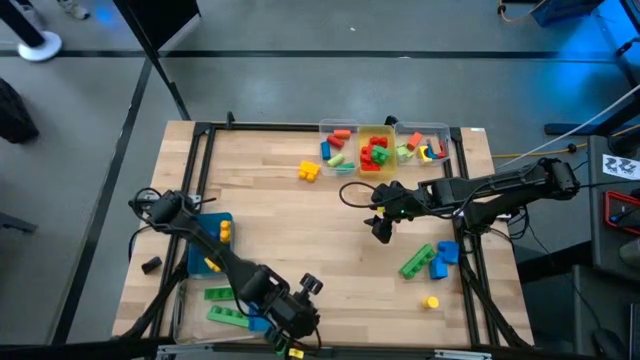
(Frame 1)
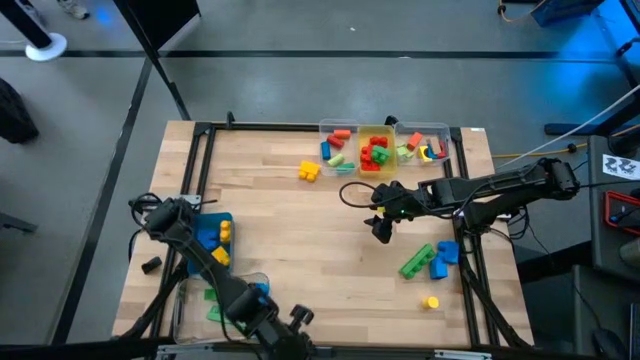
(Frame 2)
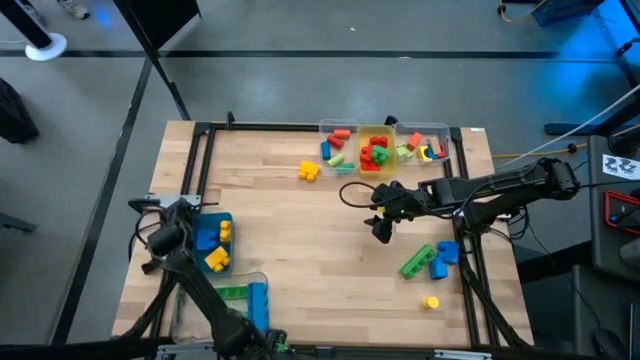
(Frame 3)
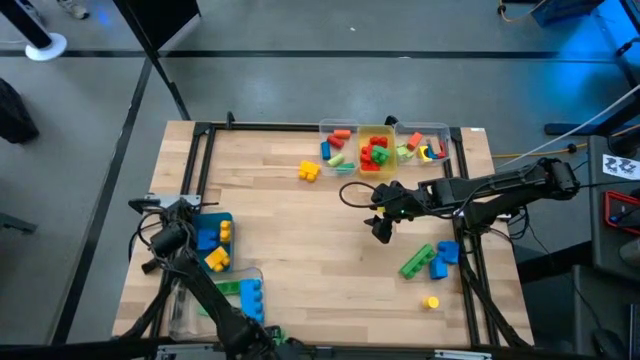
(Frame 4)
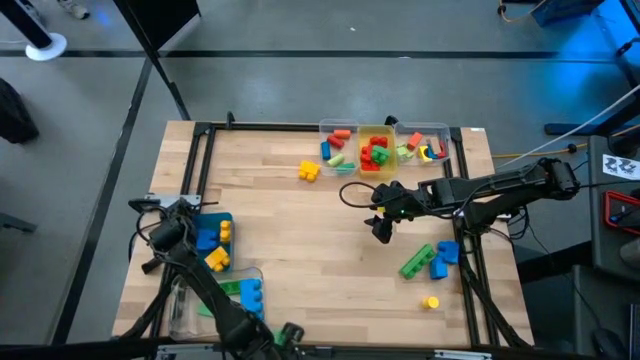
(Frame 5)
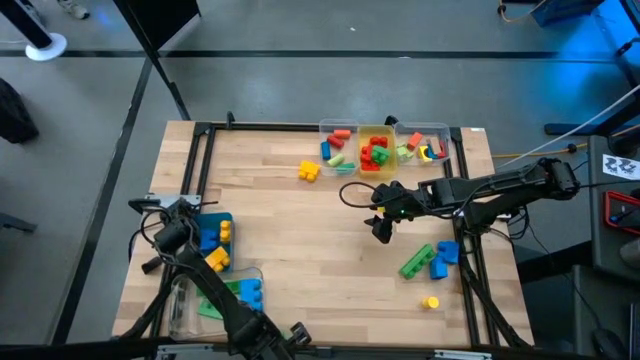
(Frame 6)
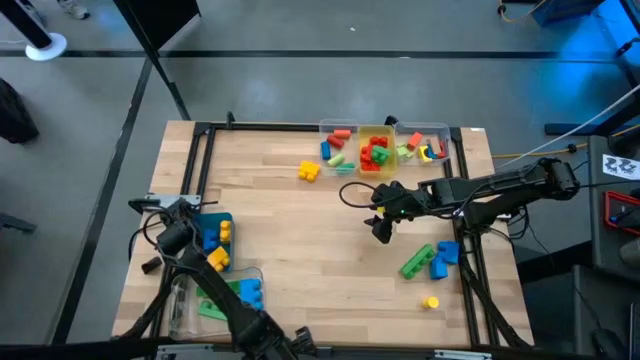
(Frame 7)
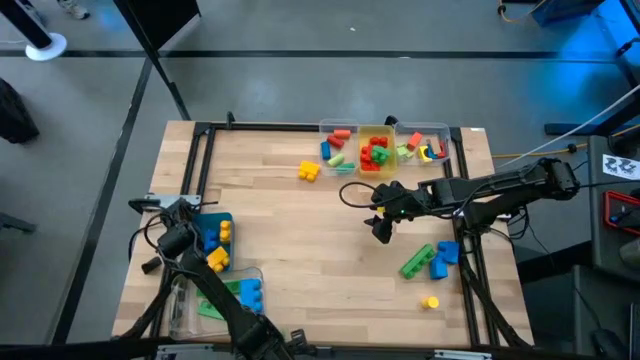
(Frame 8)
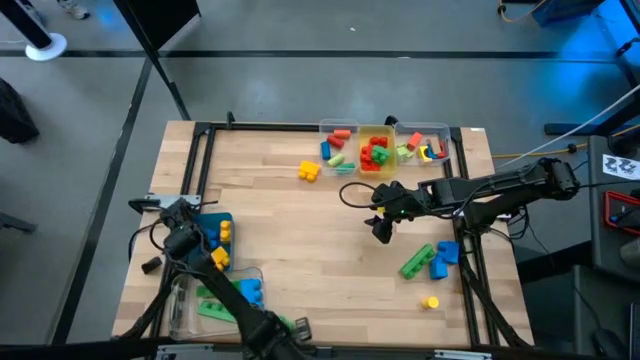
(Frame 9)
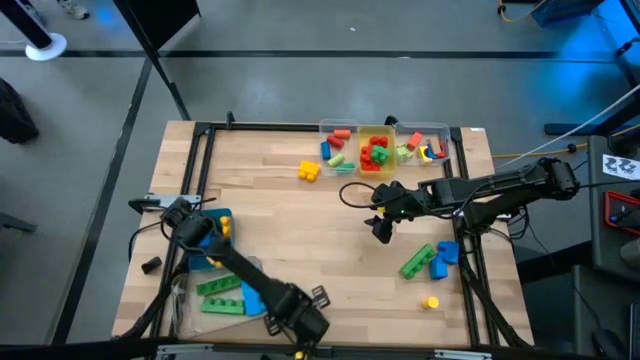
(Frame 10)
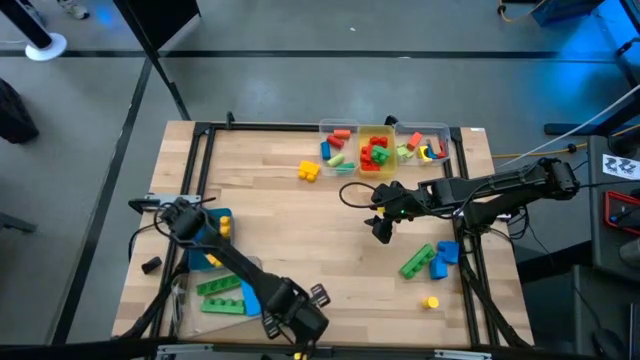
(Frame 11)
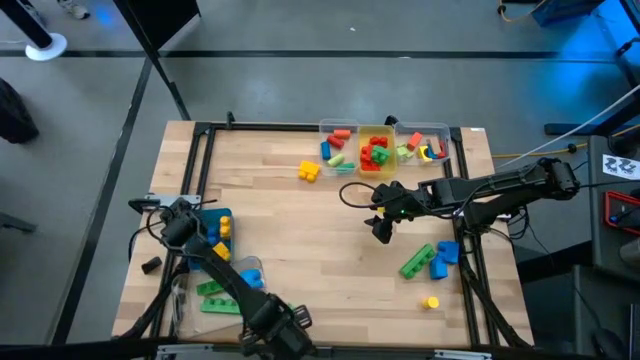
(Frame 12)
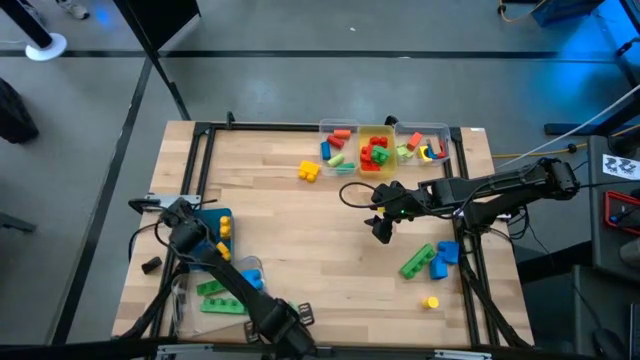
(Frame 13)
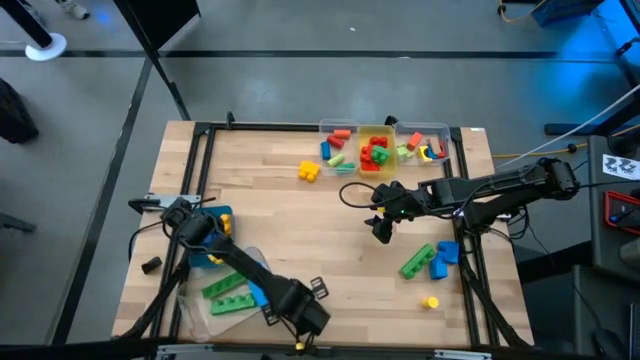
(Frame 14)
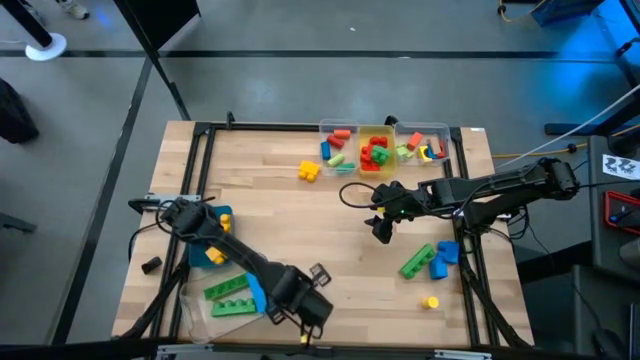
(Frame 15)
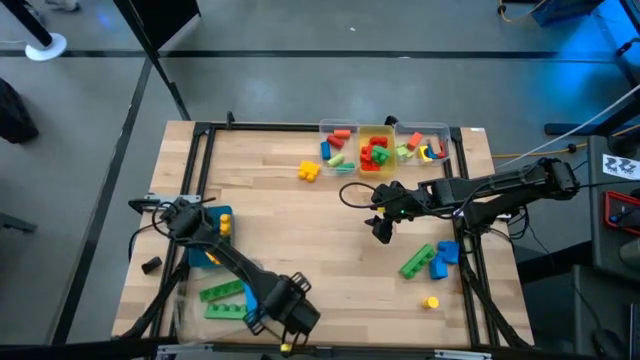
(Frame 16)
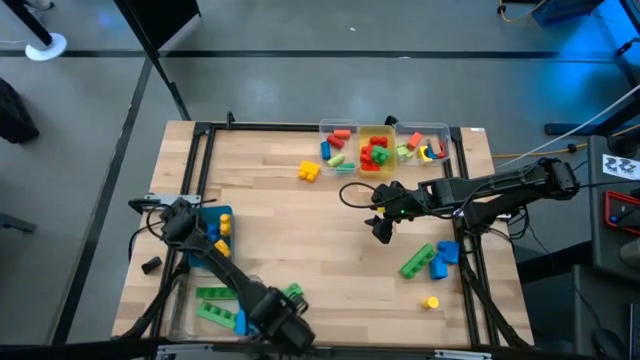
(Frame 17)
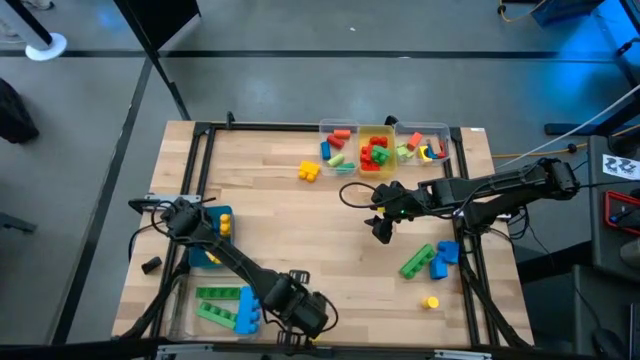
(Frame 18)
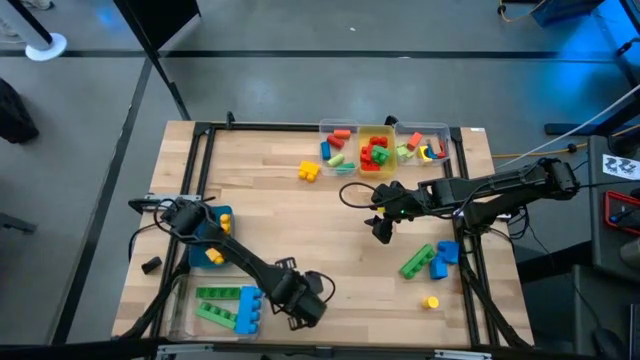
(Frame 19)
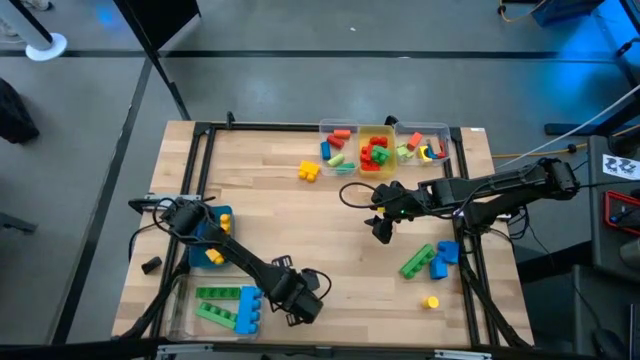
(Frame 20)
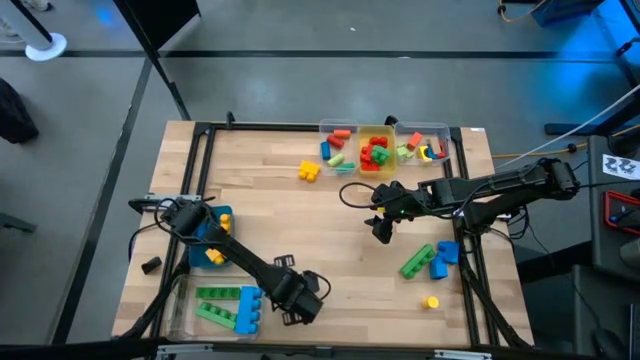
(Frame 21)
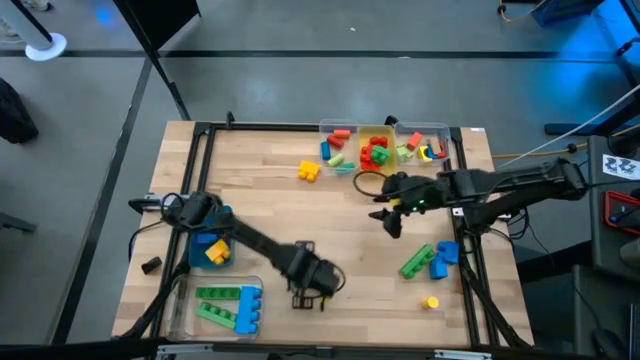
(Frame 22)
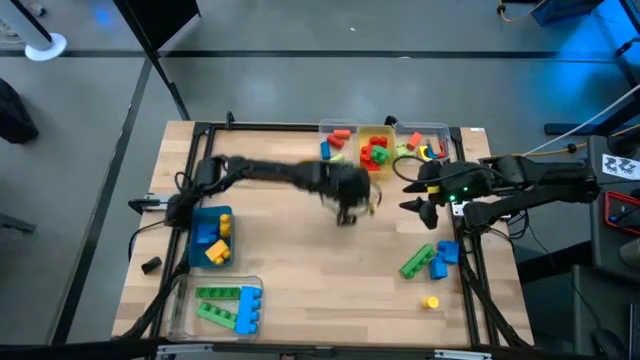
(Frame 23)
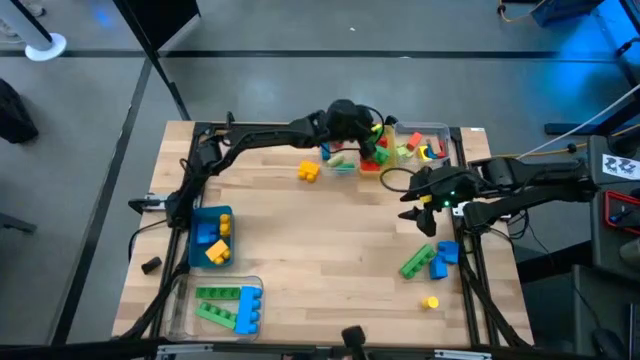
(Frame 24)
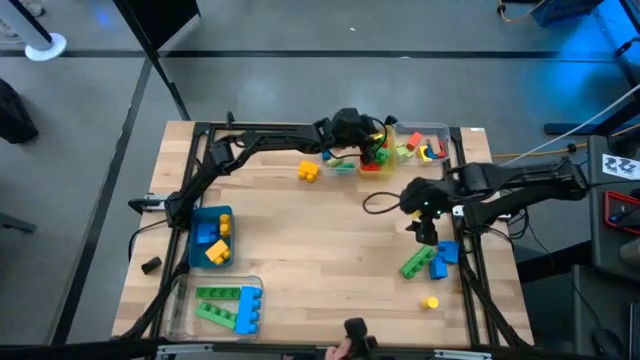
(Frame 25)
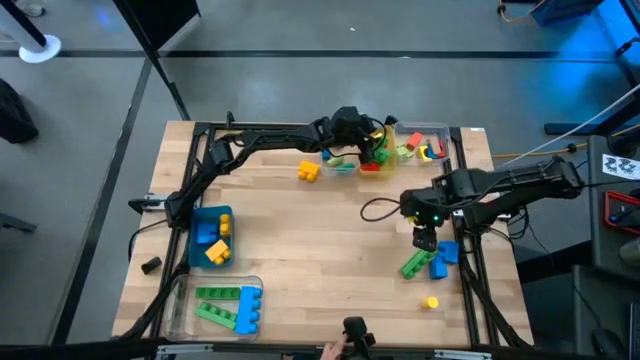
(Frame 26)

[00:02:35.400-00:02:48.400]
Task: Sort blocks by size
Put the green 2 stud game piece into the yellow bin

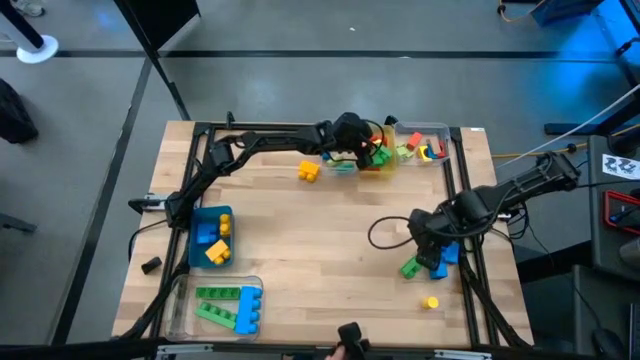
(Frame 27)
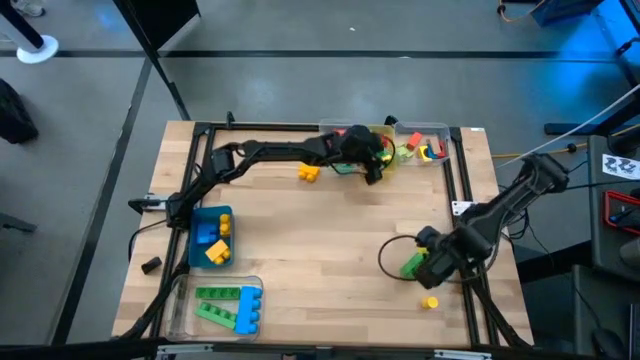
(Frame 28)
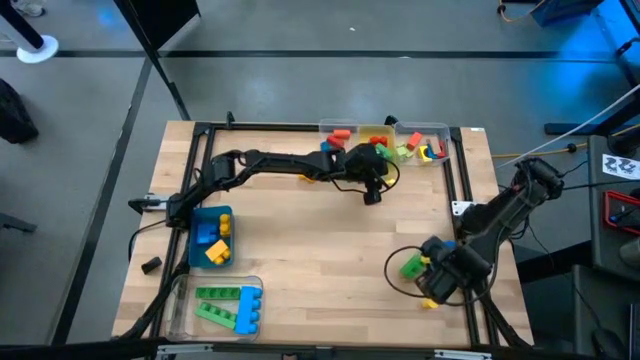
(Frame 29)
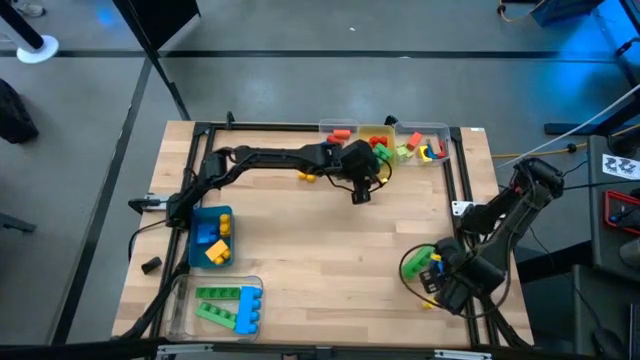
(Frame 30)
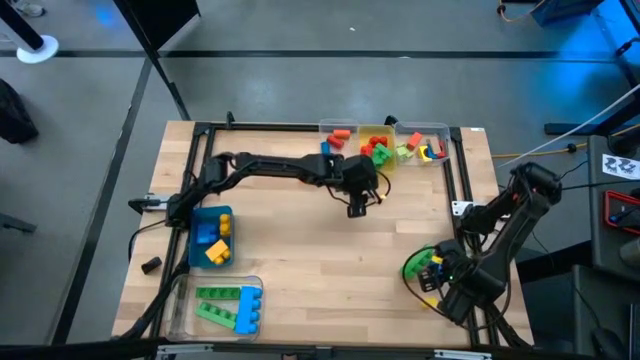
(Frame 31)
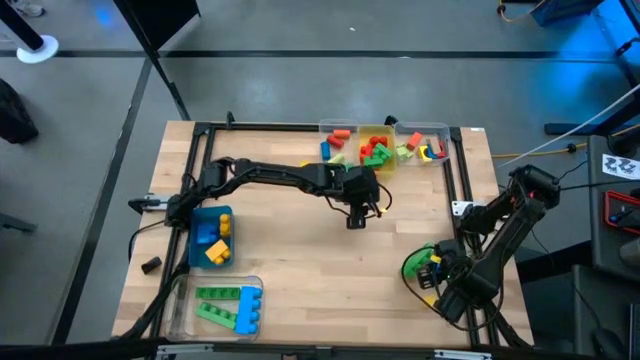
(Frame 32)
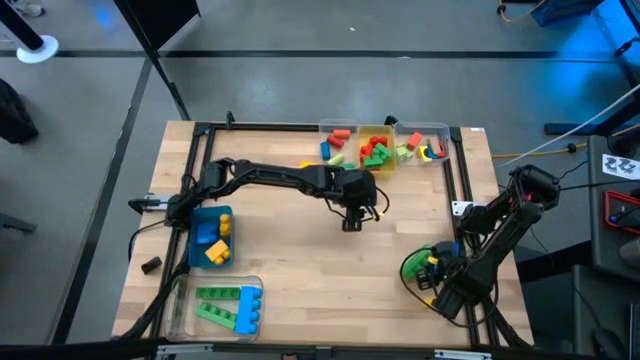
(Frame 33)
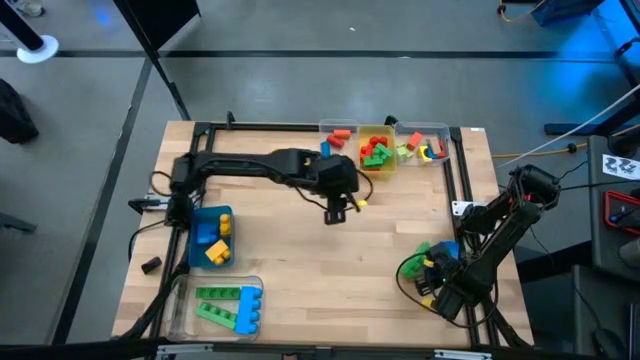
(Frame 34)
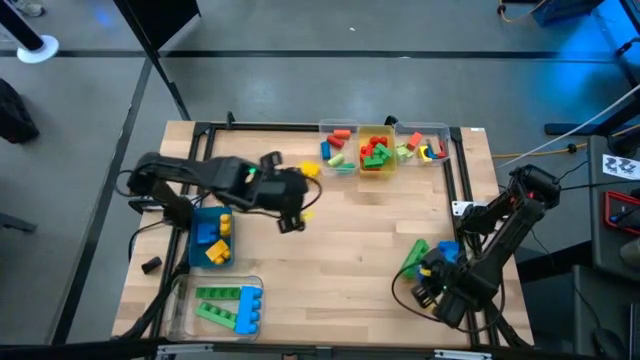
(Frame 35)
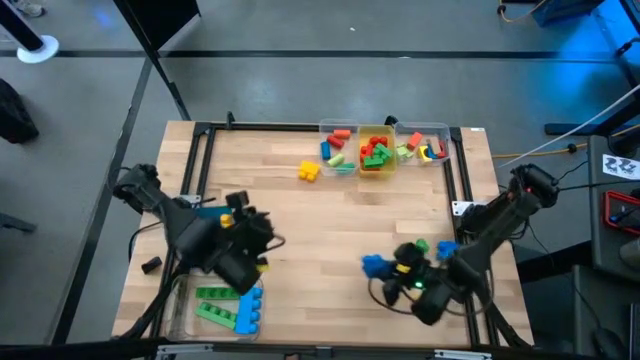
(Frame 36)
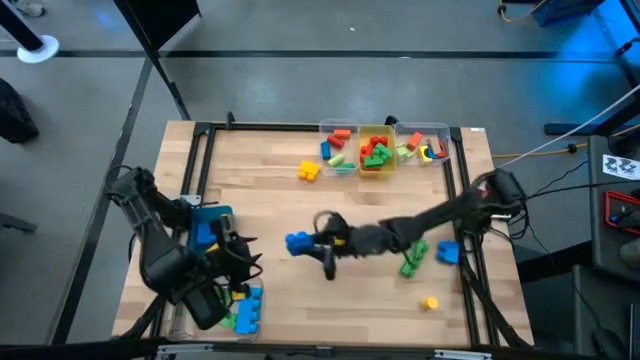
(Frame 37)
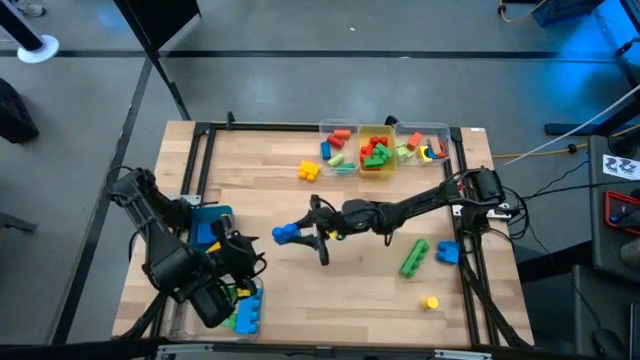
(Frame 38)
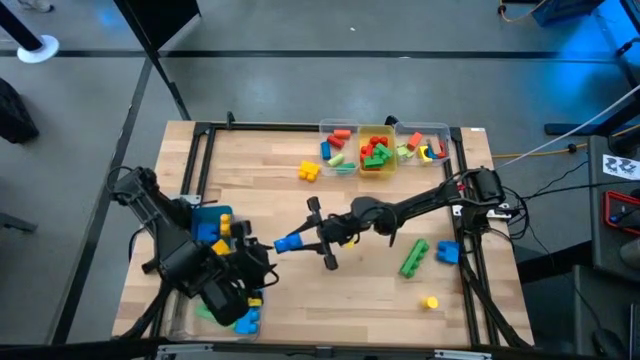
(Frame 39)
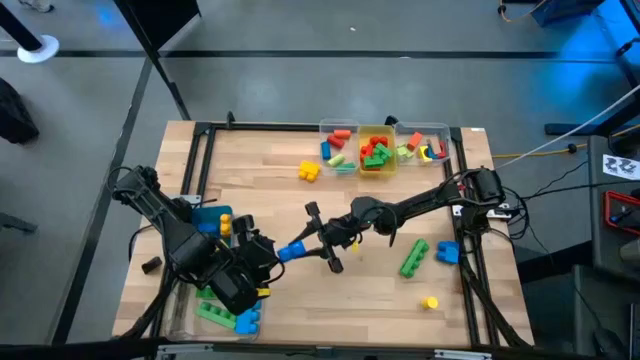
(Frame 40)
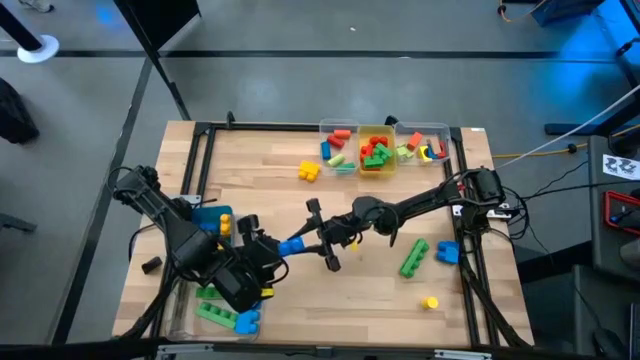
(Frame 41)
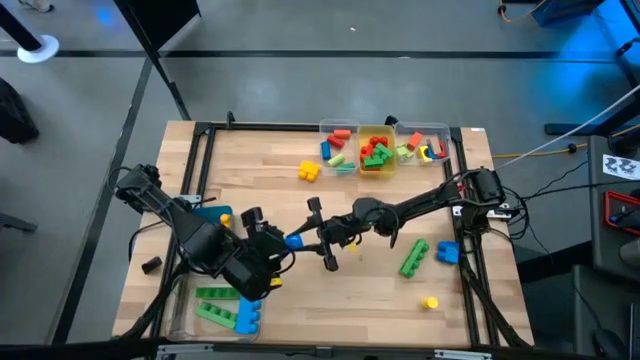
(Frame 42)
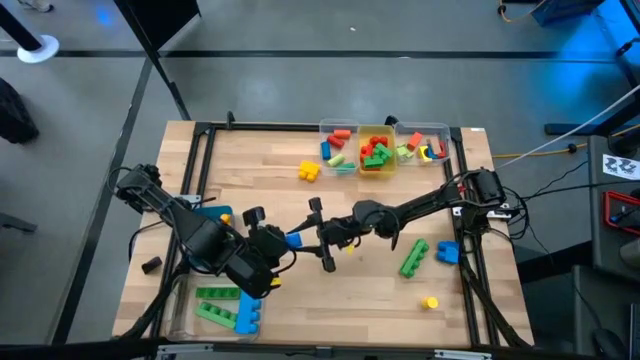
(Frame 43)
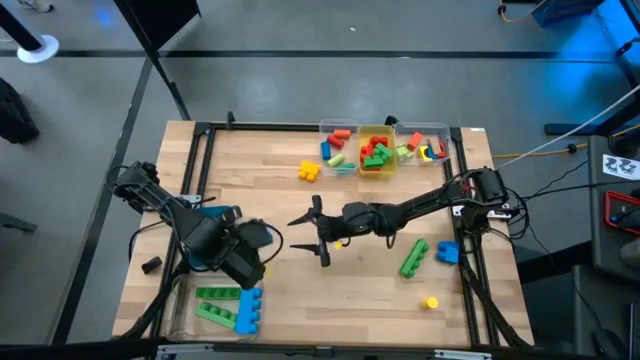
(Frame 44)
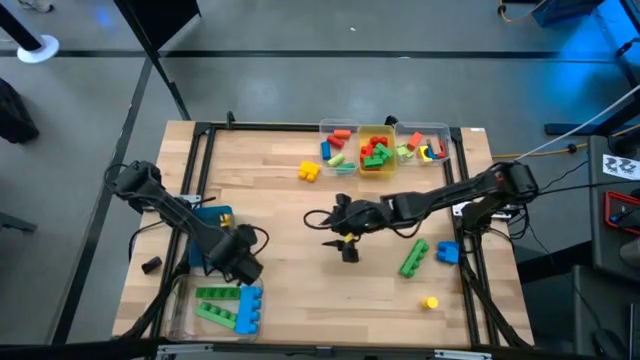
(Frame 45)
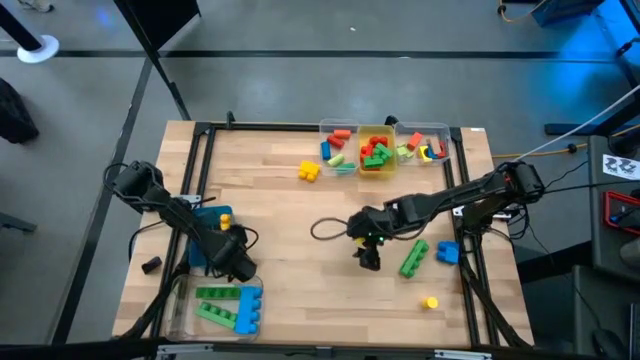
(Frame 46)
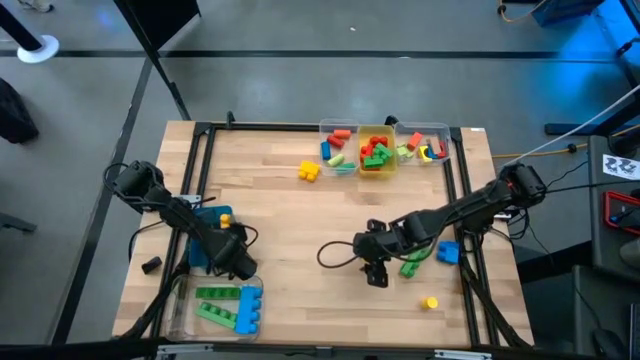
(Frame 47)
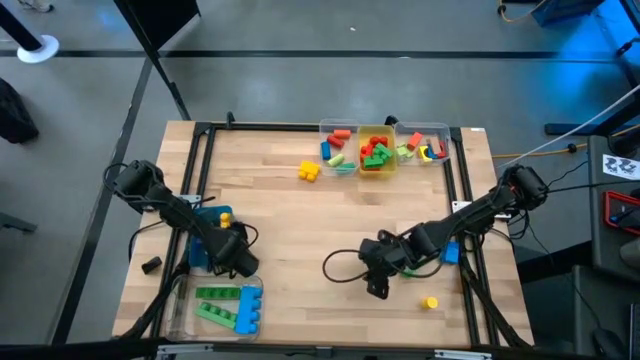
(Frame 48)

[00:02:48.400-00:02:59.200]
Put the blue 2 stud game piece into the blue bin
